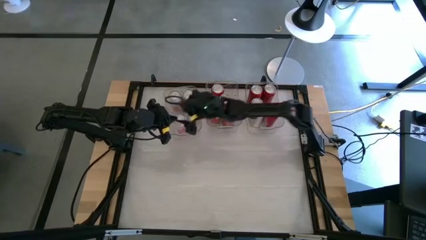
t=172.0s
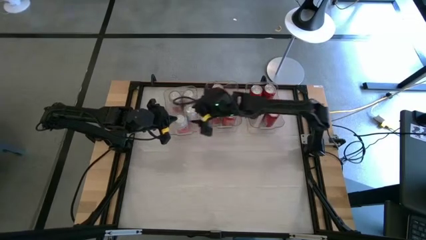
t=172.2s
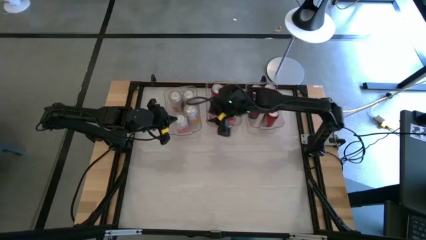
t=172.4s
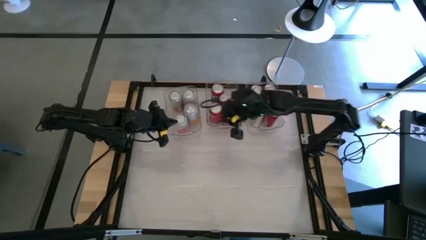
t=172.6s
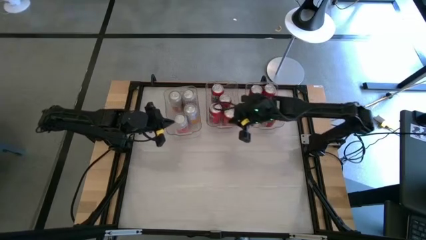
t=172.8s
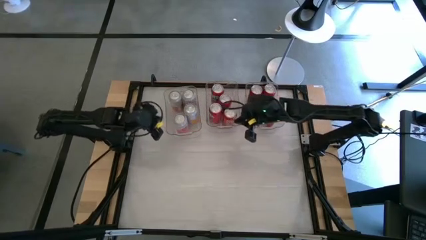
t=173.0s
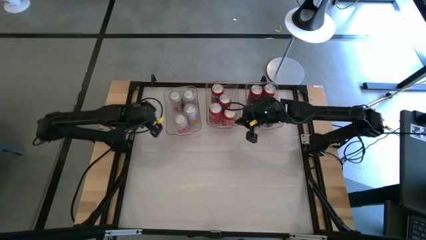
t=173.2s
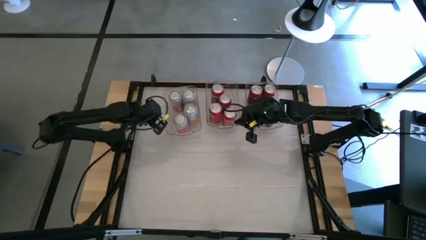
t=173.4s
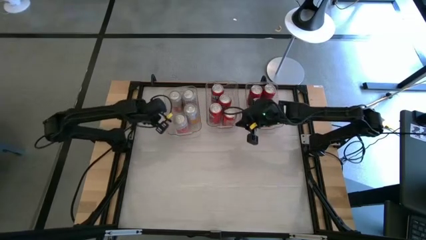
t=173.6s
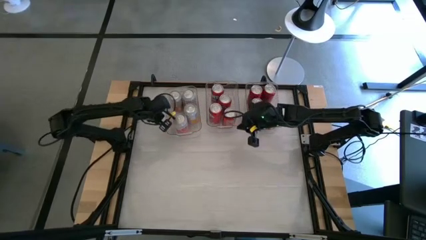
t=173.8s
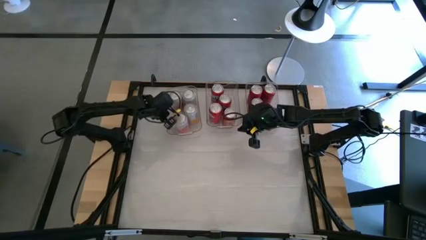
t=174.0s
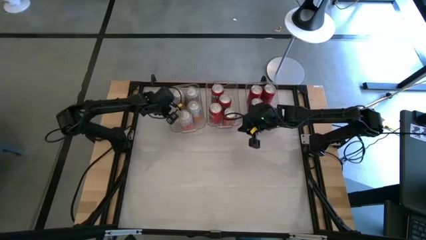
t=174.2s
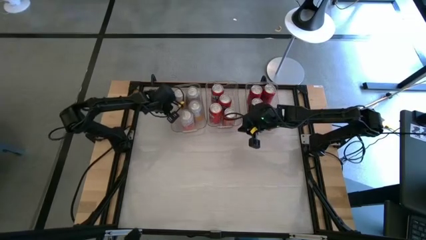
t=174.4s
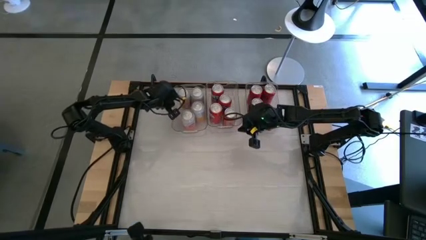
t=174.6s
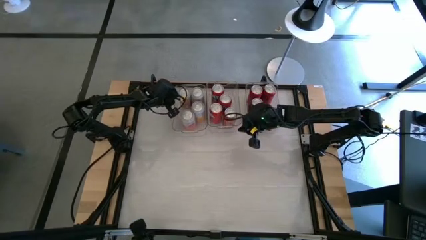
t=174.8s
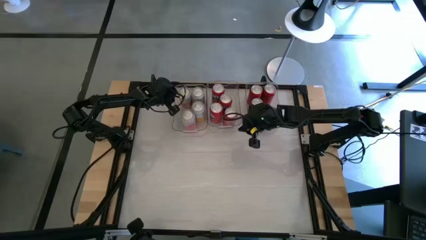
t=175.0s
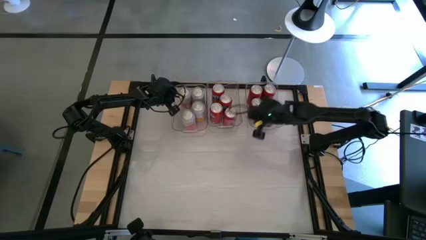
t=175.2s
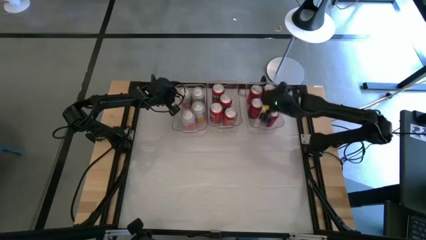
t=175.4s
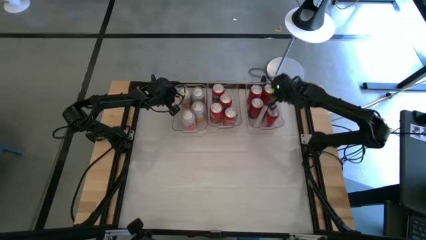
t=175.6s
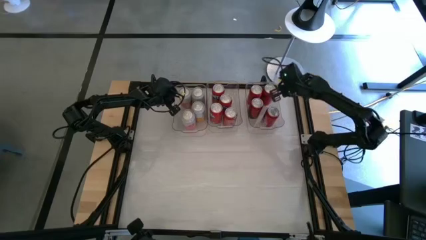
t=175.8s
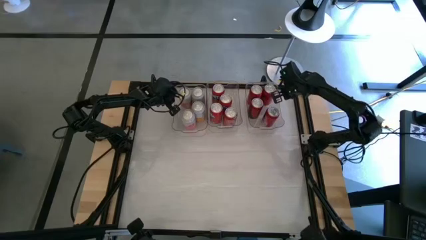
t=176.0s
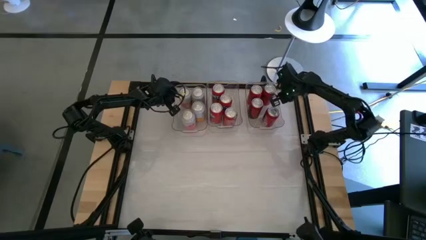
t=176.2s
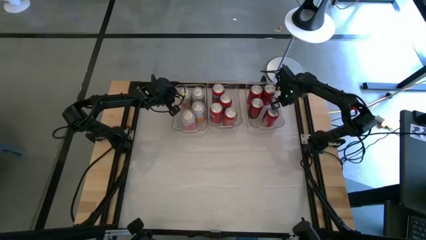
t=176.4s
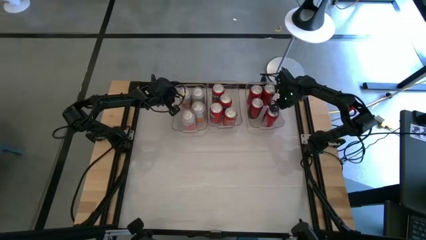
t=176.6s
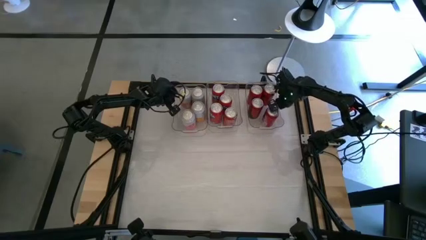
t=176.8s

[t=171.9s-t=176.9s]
Task: Sort soda cans
Adjust the transparent bins

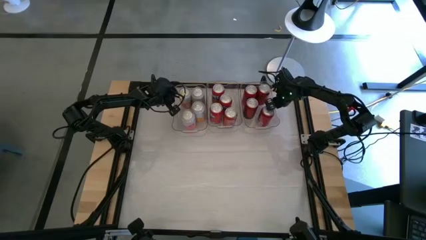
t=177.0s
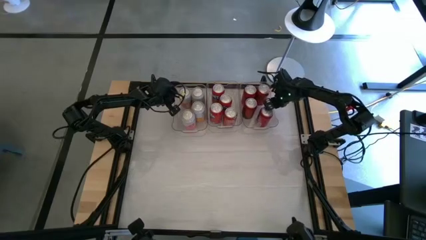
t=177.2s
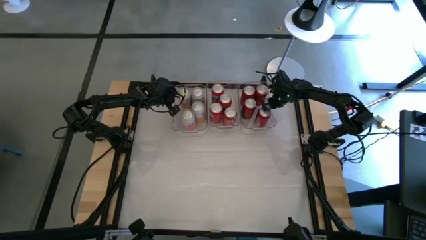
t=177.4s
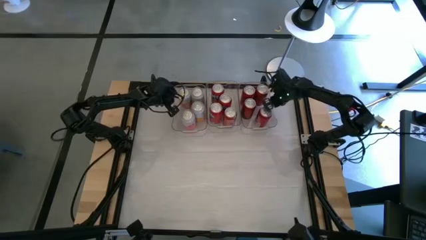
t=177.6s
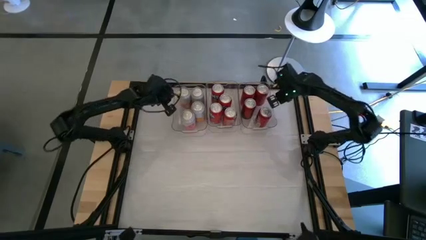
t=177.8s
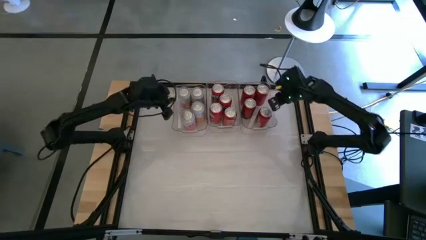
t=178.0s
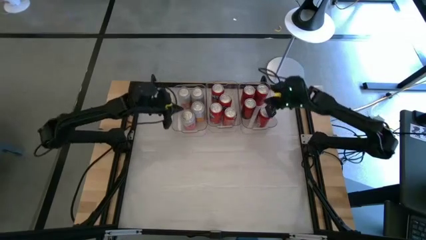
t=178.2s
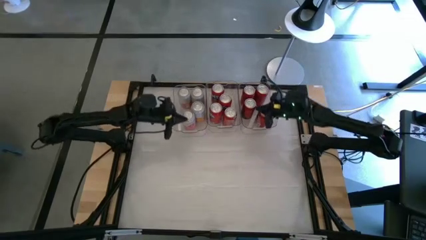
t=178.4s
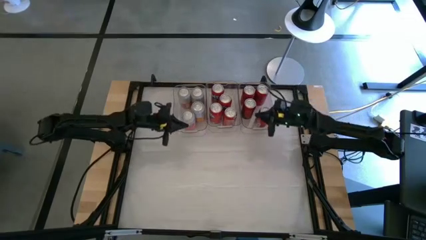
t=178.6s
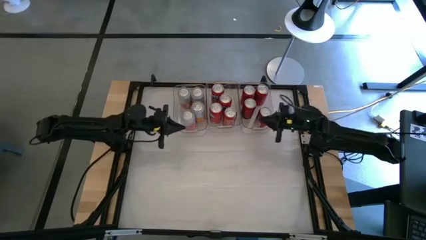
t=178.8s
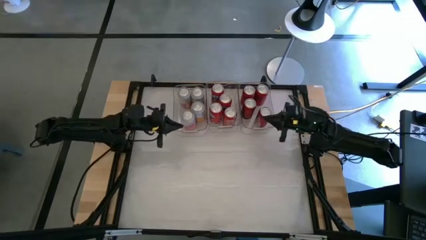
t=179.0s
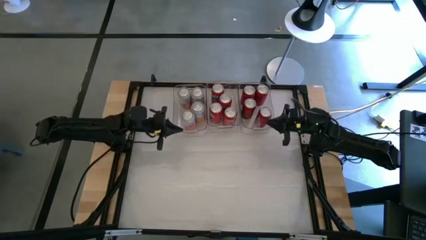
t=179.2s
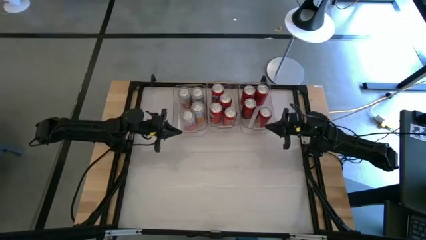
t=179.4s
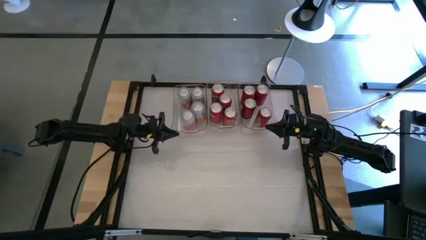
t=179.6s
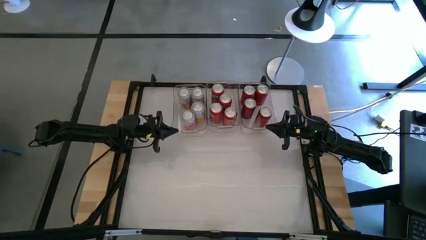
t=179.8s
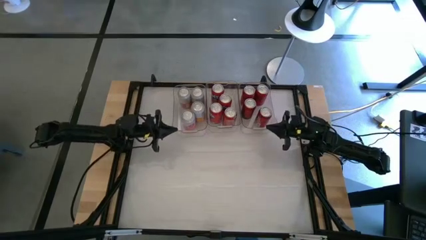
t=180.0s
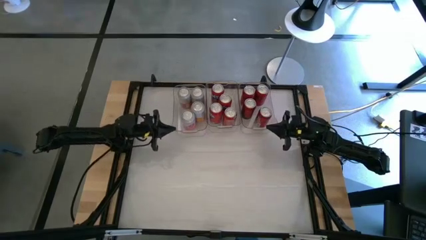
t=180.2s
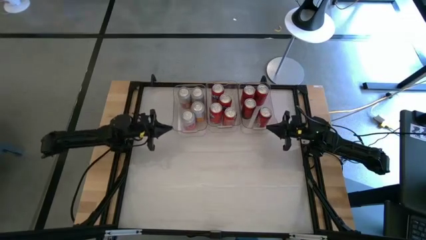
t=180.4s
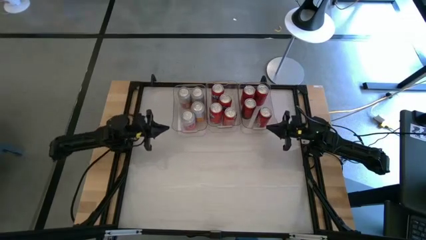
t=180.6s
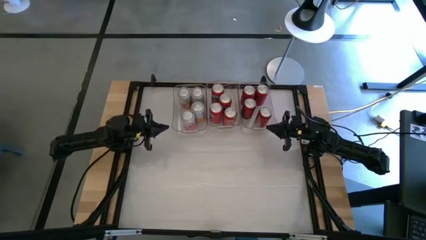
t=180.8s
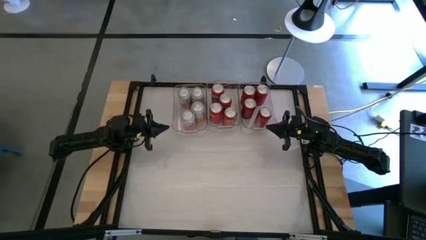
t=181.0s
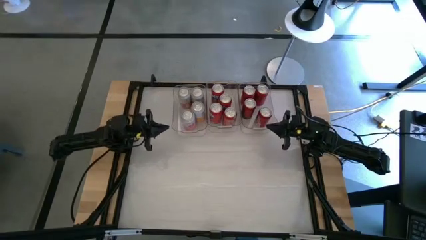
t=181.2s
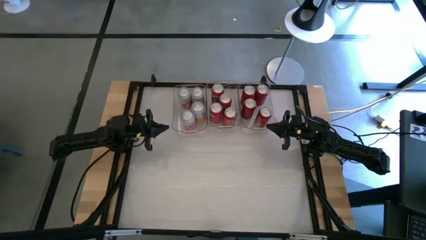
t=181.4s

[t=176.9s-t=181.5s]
Return to Home Position

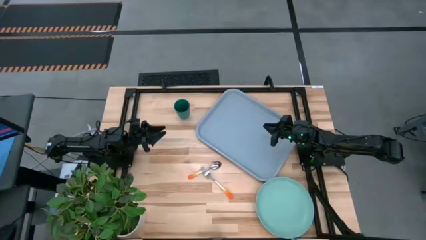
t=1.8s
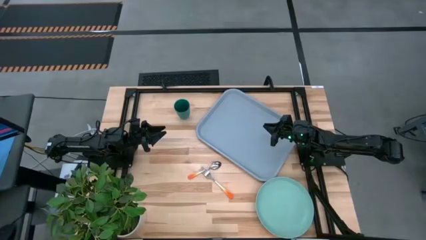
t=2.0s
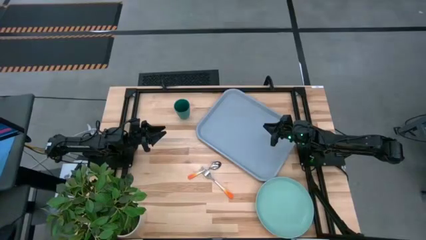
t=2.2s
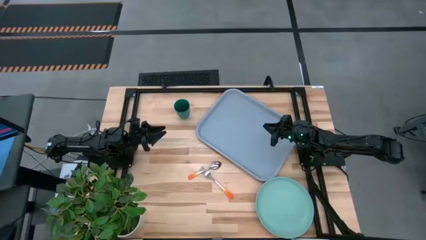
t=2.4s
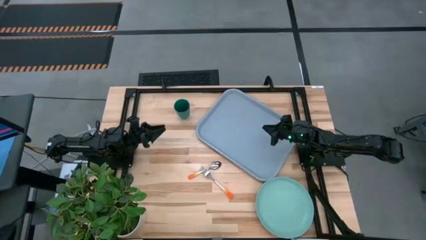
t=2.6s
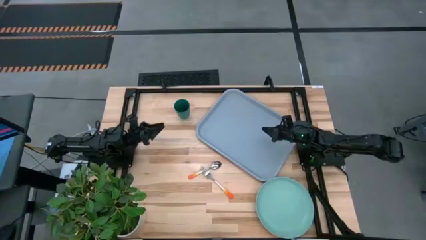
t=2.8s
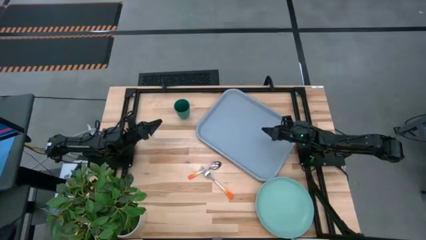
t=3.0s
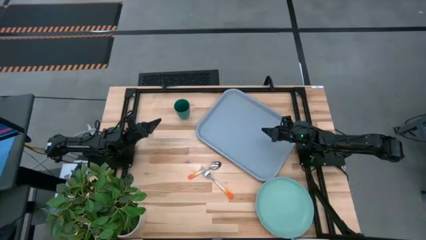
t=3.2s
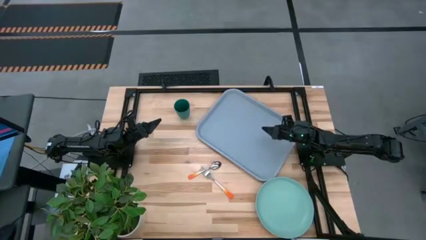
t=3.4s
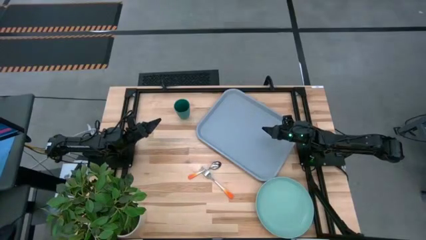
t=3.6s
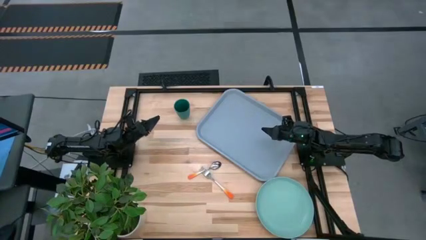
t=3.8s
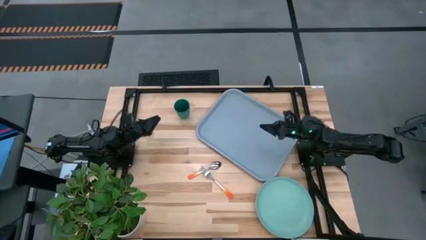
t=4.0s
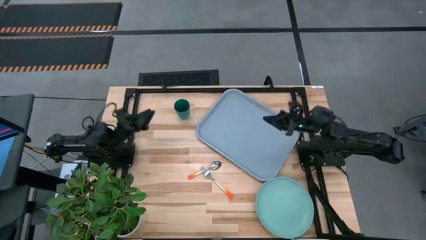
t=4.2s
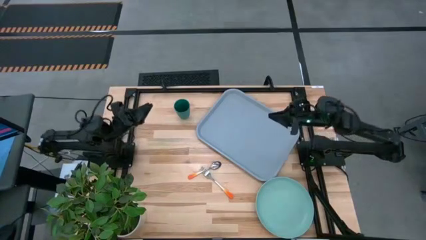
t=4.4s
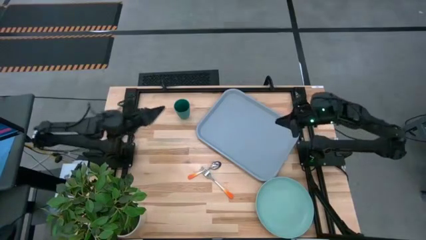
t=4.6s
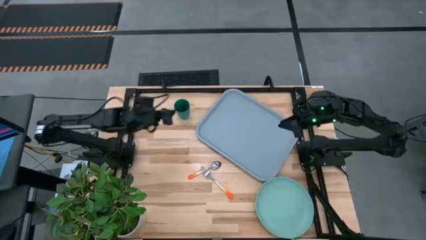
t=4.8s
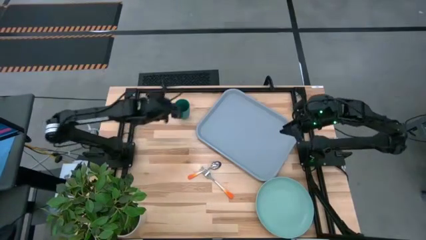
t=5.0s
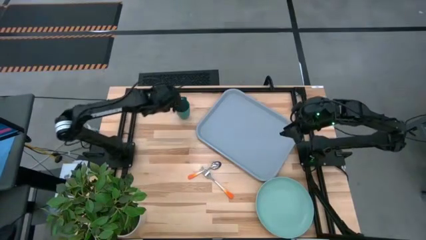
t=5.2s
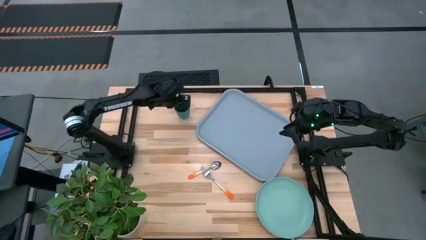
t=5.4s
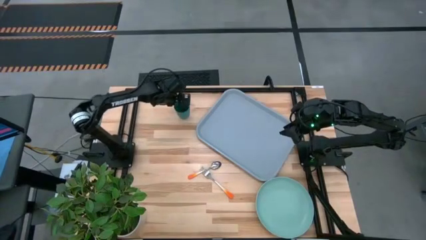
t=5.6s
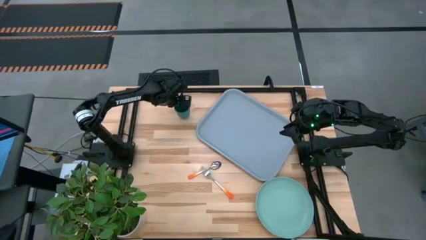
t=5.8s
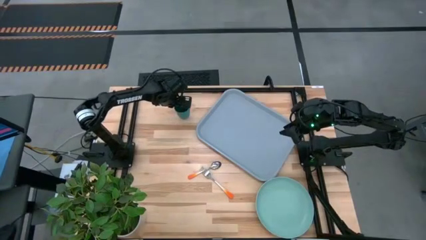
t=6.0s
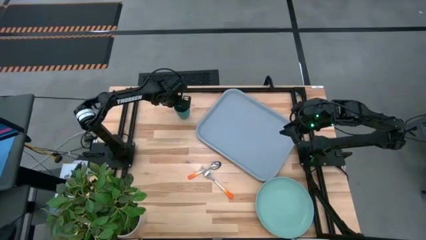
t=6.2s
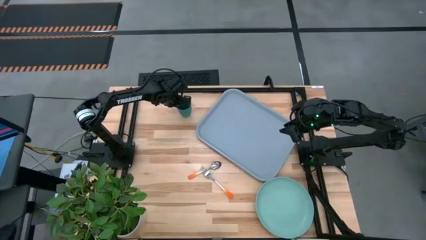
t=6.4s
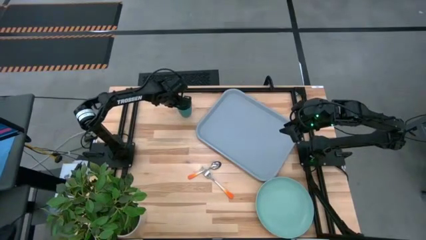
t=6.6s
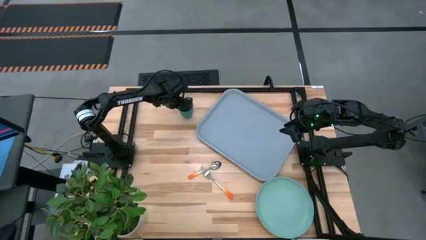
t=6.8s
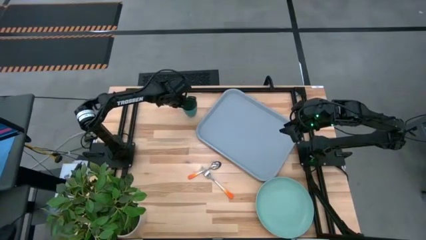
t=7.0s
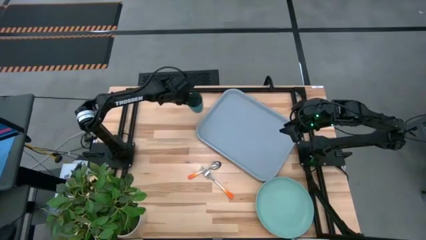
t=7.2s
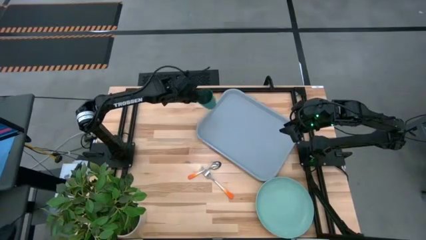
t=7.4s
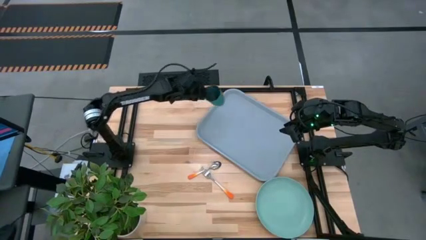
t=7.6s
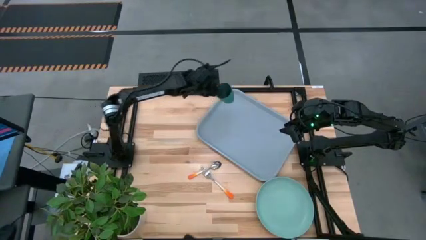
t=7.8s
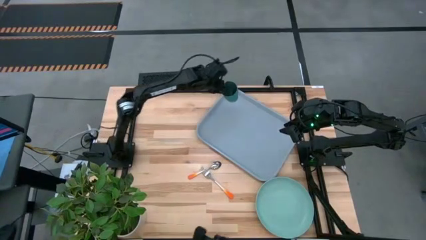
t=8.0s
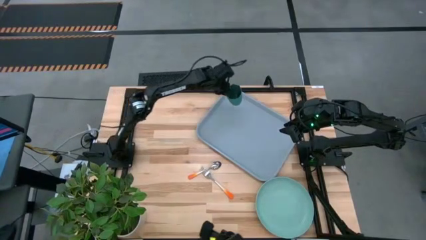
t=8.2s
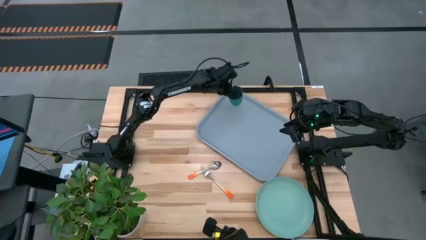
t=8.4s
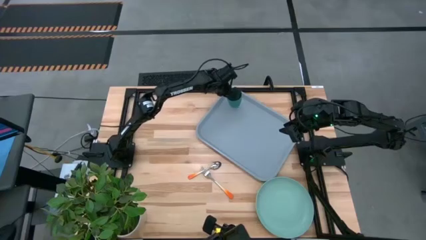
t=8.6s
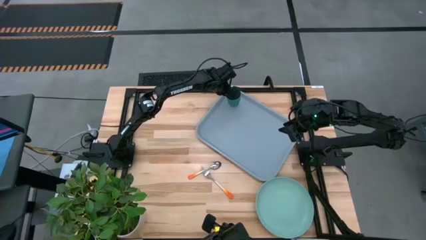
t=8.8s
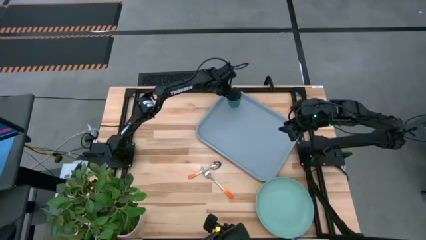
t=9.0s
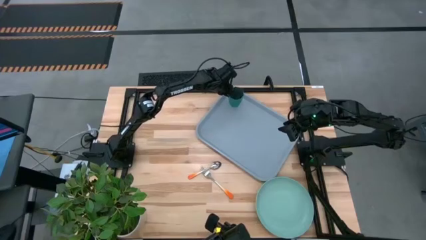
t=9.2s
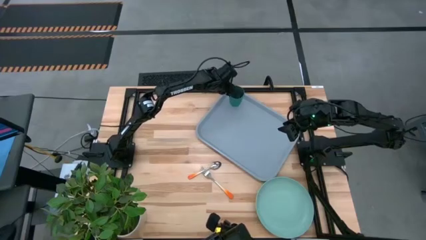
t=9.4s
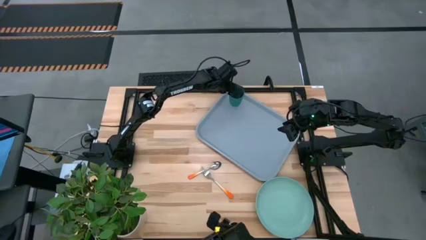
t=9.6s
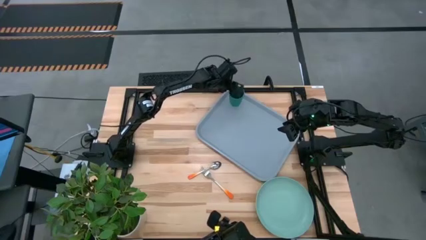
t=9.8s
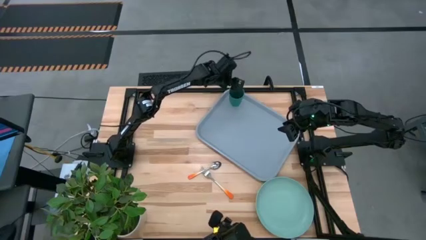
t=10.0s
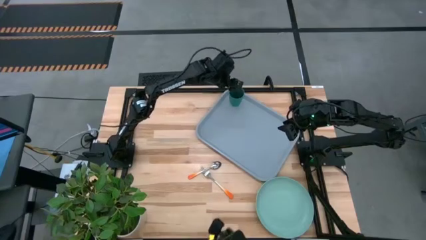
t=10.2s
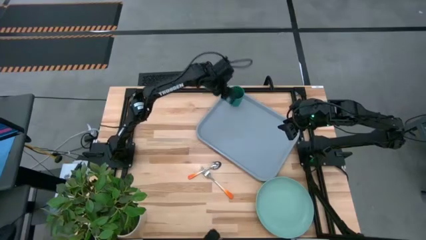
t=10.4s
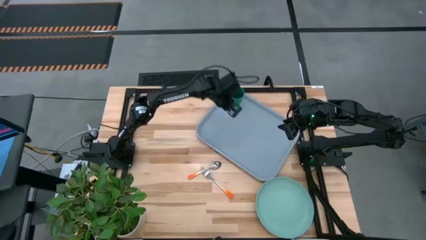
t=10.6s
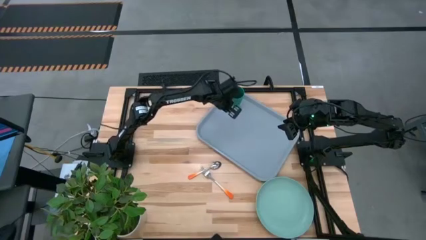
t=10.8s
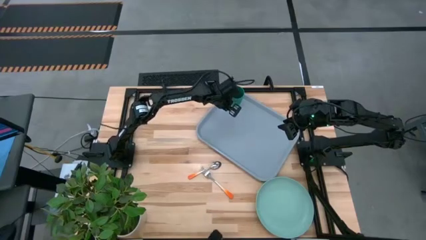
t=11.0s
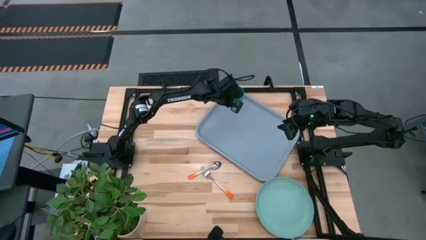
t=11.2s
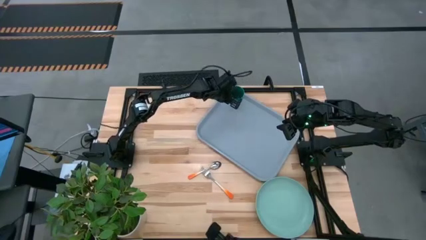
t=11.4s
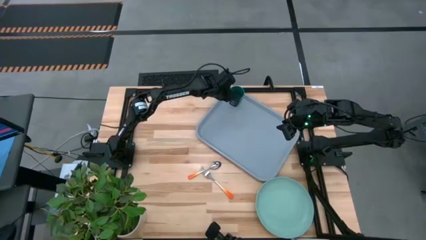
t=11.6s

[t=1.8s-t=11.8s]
Task: Pick and place plate/cup/fork/spoon on tray
Put the blue cup to the top left of the blue tray
